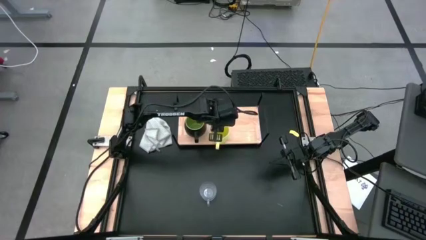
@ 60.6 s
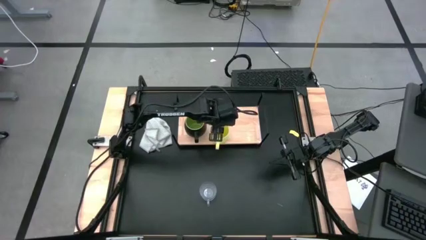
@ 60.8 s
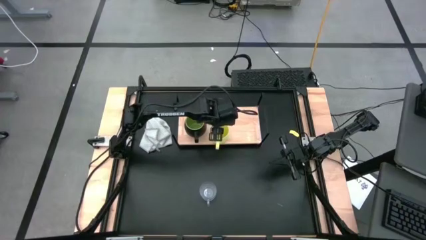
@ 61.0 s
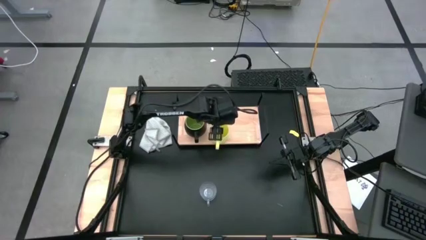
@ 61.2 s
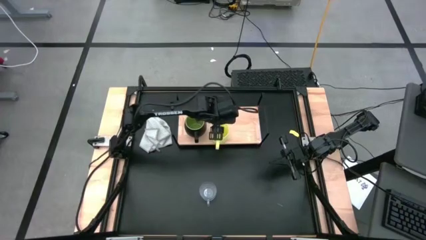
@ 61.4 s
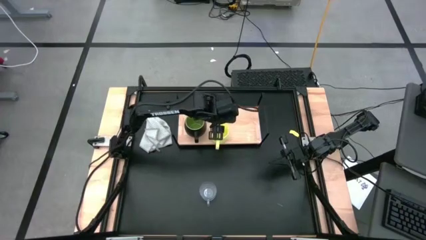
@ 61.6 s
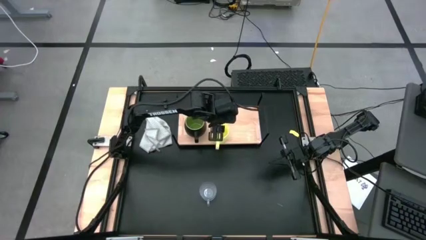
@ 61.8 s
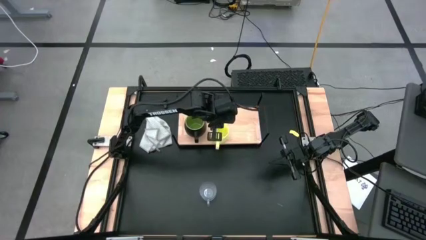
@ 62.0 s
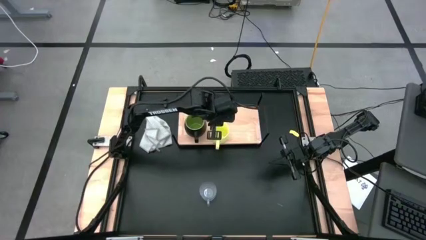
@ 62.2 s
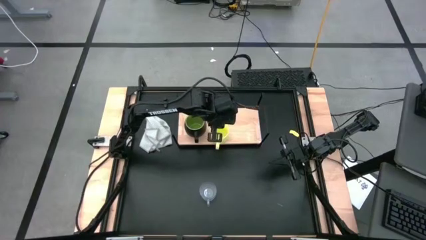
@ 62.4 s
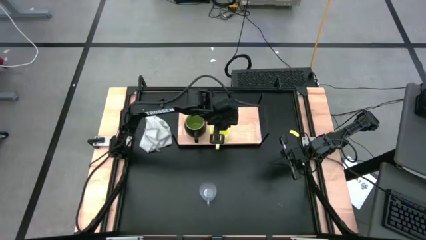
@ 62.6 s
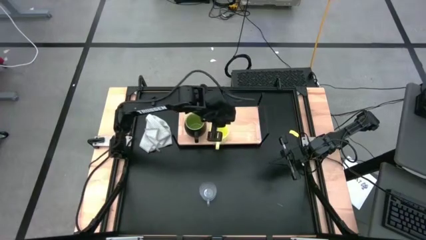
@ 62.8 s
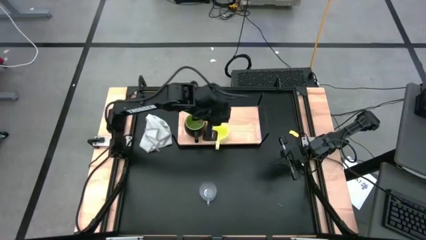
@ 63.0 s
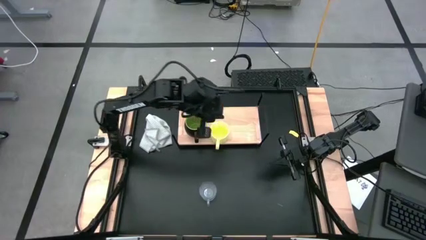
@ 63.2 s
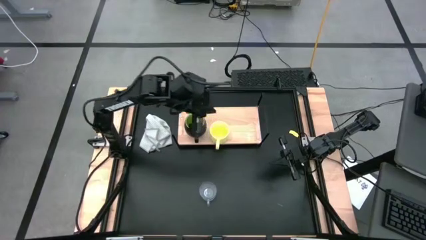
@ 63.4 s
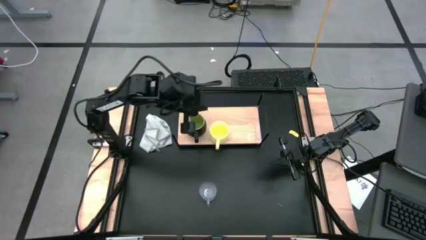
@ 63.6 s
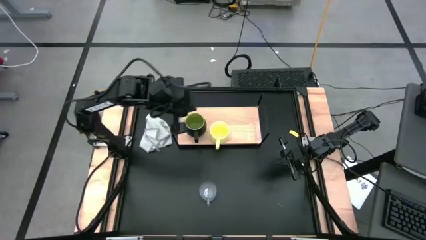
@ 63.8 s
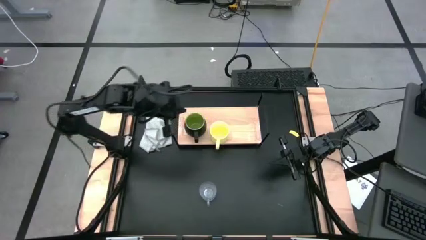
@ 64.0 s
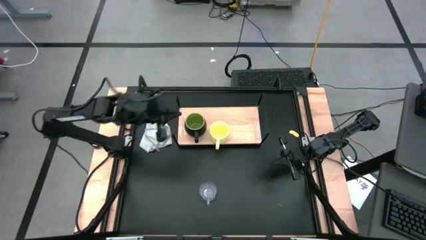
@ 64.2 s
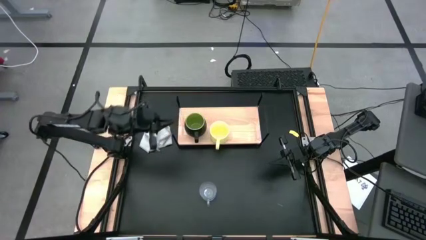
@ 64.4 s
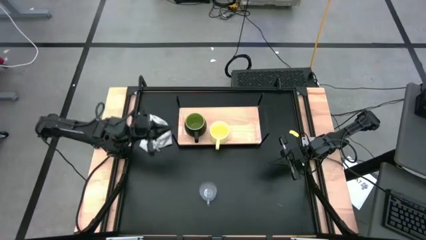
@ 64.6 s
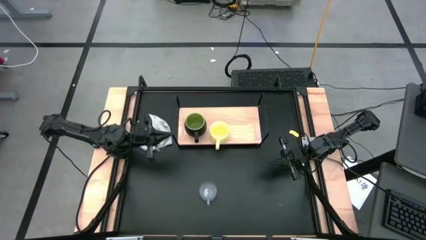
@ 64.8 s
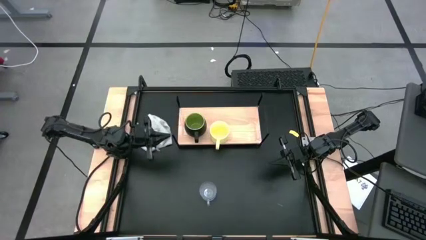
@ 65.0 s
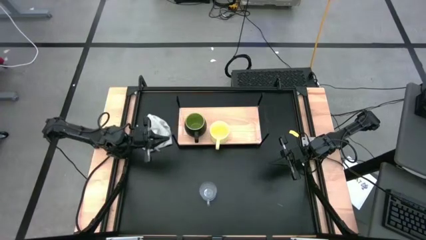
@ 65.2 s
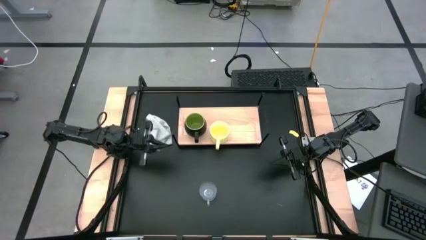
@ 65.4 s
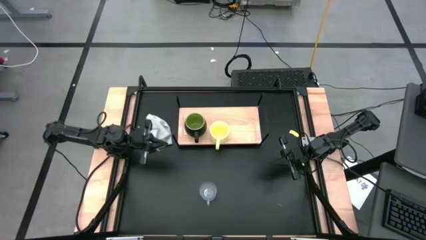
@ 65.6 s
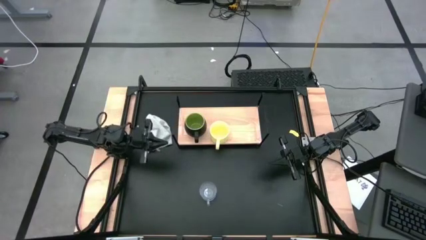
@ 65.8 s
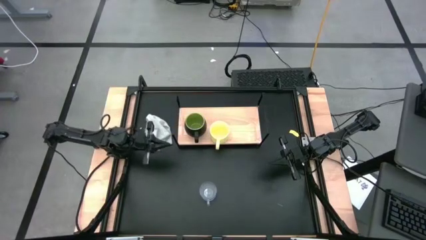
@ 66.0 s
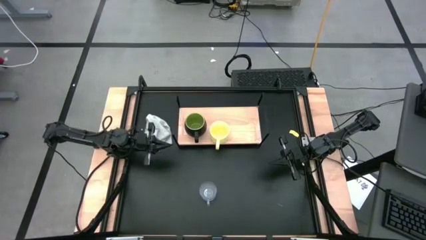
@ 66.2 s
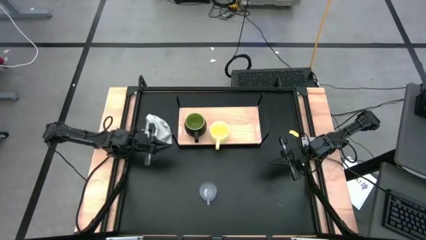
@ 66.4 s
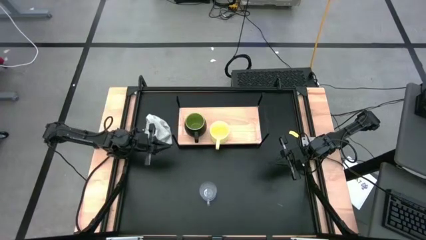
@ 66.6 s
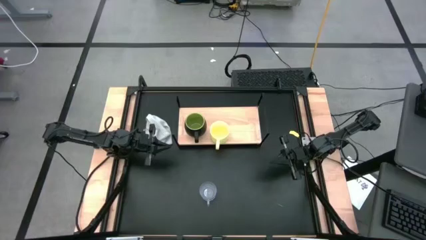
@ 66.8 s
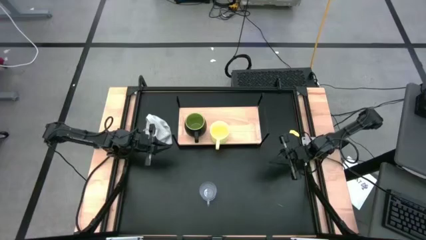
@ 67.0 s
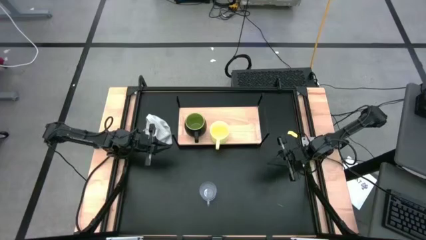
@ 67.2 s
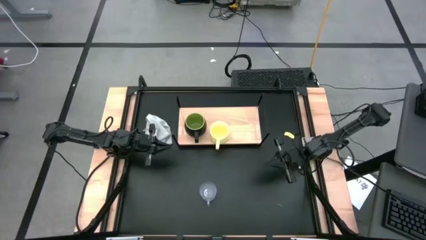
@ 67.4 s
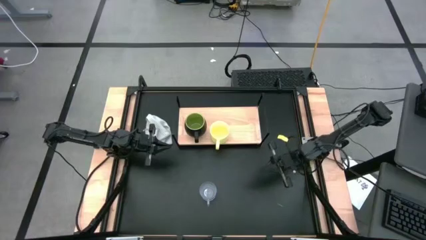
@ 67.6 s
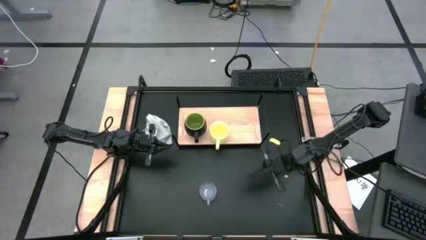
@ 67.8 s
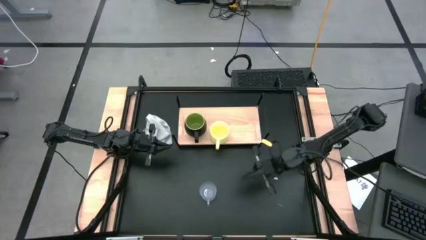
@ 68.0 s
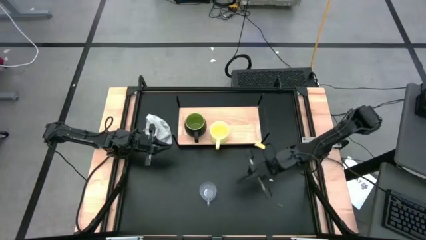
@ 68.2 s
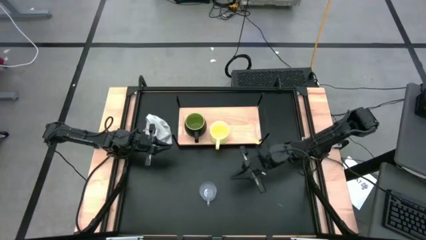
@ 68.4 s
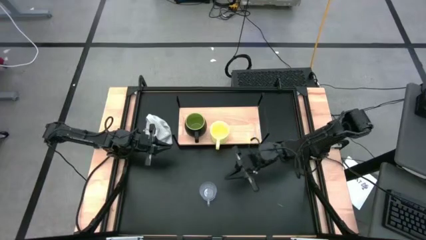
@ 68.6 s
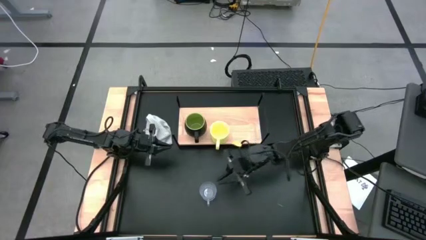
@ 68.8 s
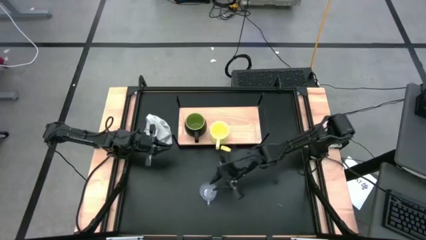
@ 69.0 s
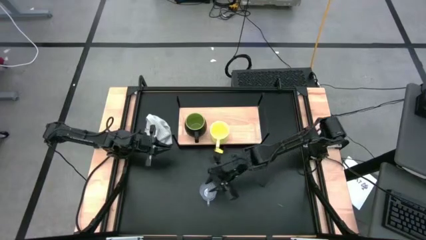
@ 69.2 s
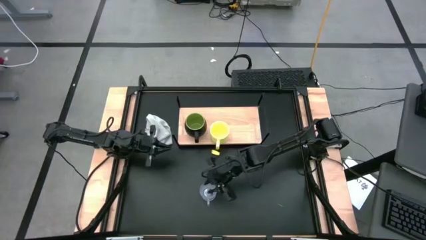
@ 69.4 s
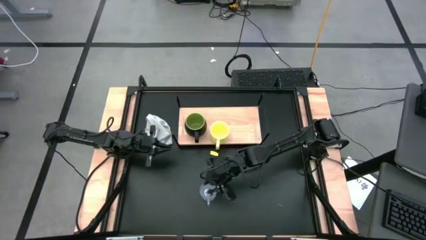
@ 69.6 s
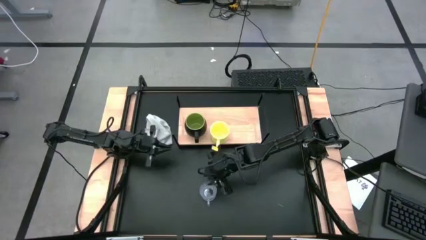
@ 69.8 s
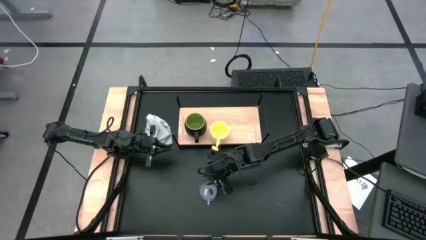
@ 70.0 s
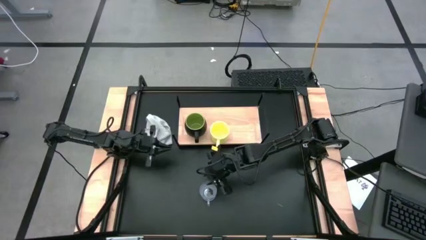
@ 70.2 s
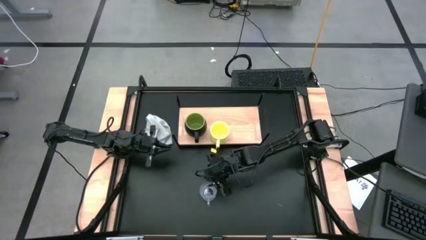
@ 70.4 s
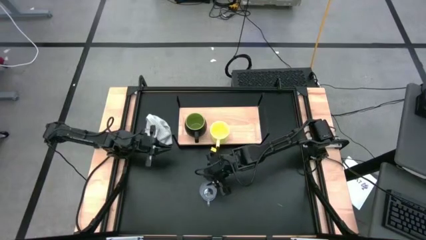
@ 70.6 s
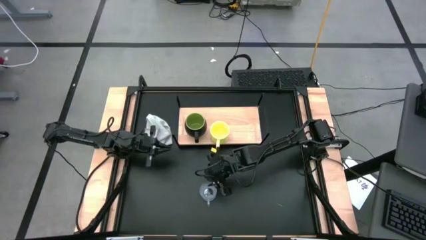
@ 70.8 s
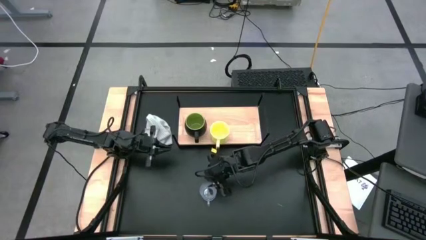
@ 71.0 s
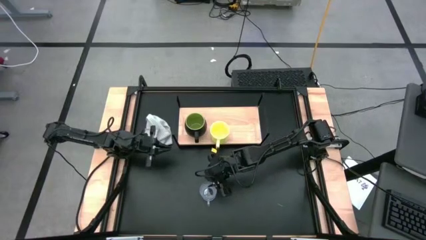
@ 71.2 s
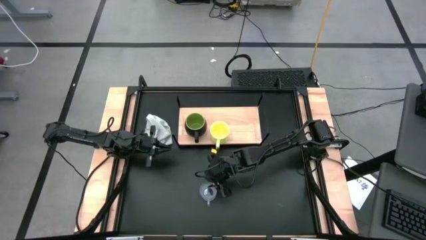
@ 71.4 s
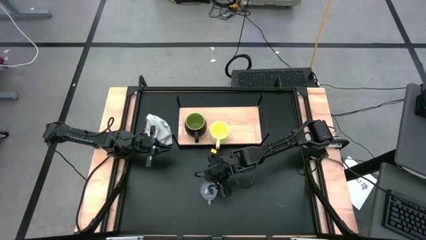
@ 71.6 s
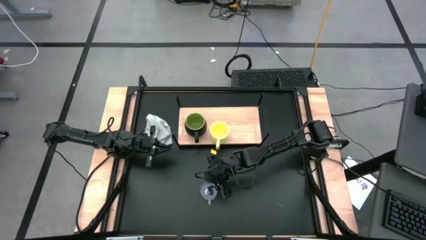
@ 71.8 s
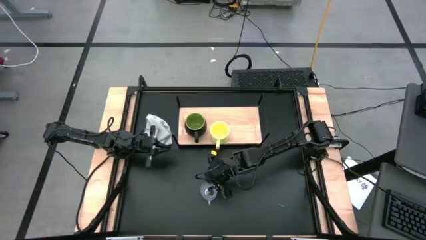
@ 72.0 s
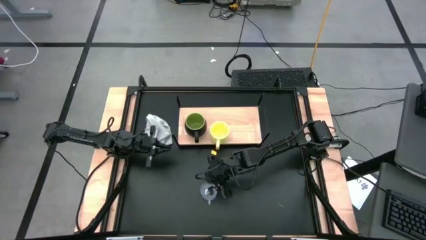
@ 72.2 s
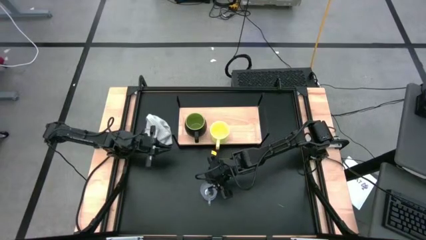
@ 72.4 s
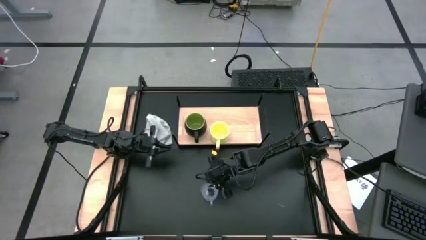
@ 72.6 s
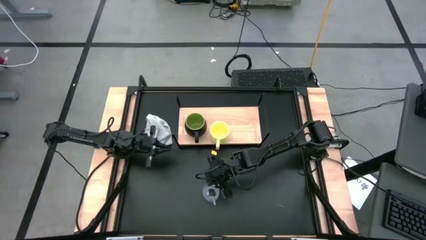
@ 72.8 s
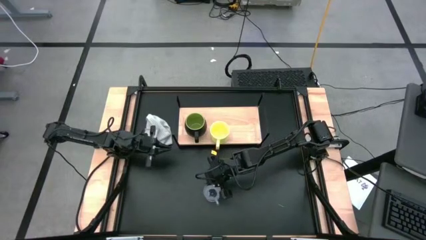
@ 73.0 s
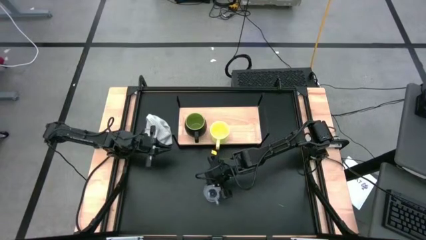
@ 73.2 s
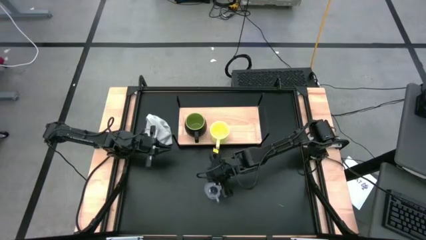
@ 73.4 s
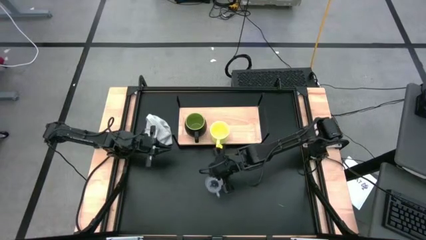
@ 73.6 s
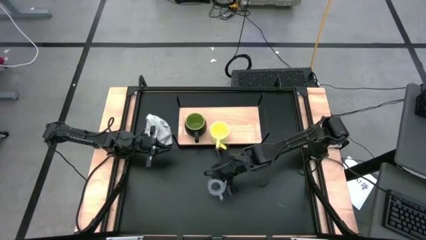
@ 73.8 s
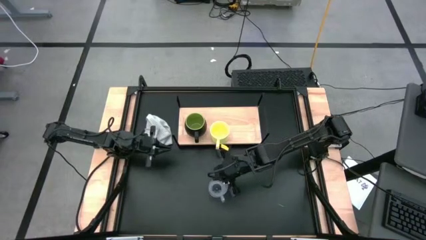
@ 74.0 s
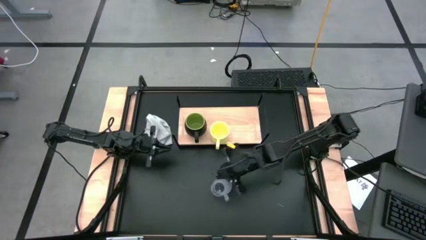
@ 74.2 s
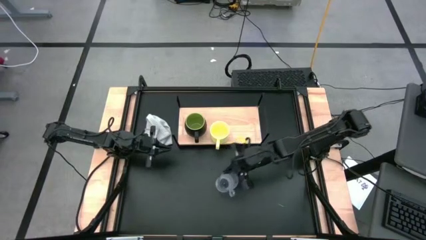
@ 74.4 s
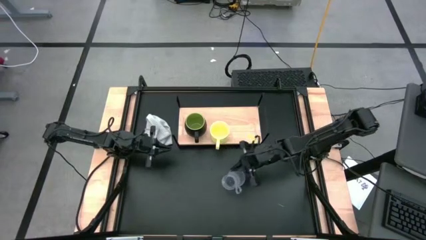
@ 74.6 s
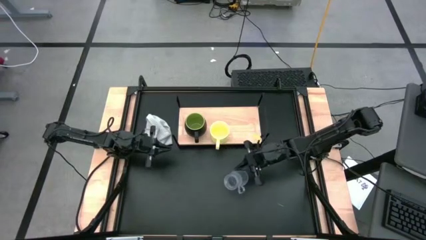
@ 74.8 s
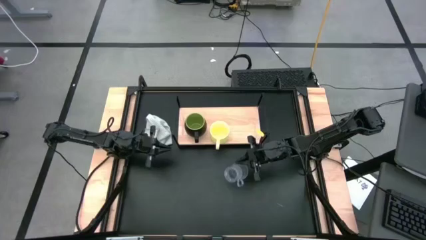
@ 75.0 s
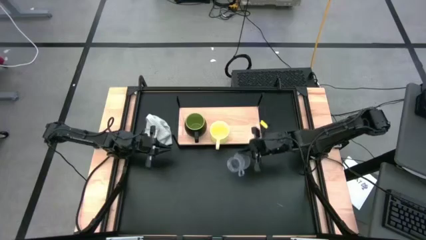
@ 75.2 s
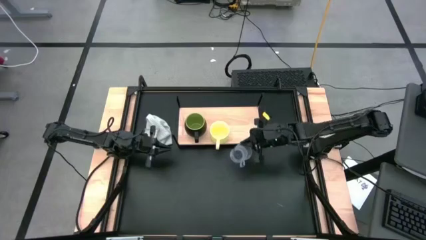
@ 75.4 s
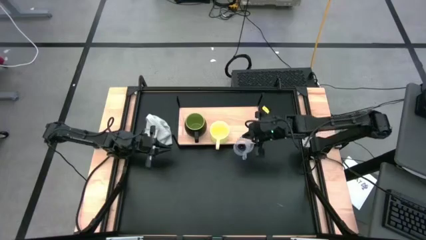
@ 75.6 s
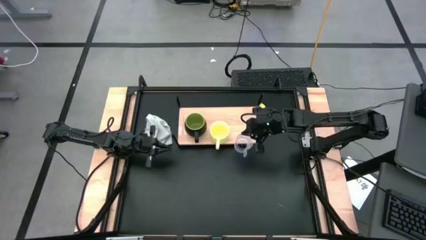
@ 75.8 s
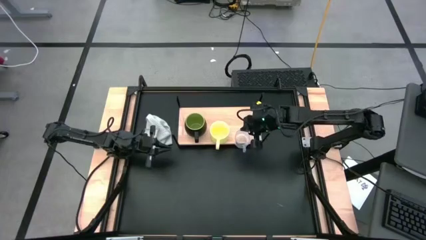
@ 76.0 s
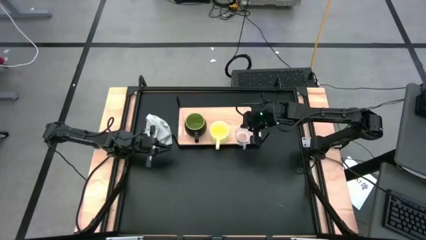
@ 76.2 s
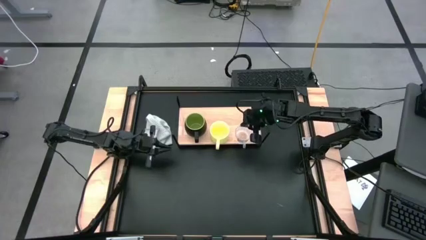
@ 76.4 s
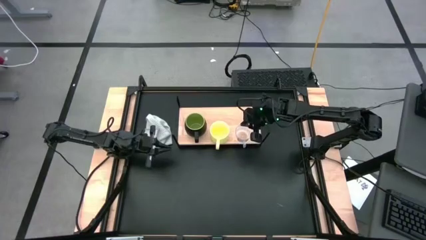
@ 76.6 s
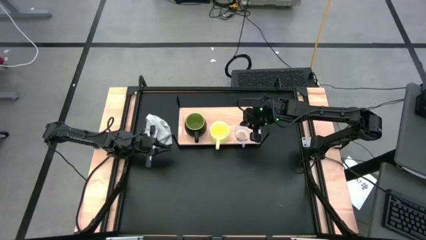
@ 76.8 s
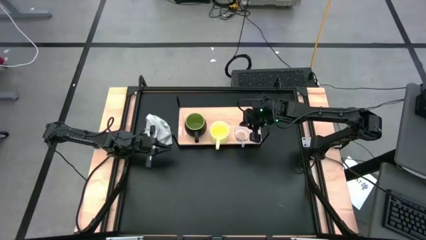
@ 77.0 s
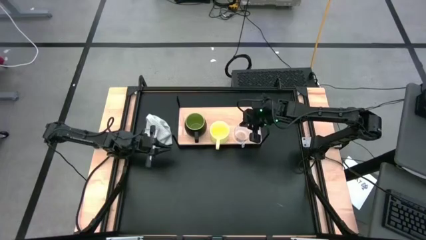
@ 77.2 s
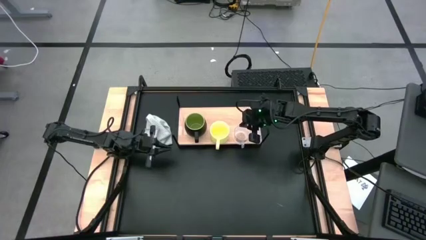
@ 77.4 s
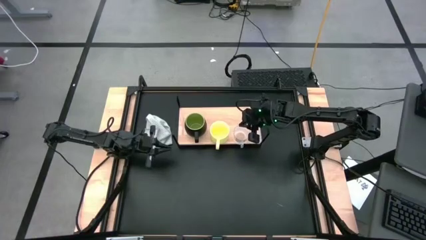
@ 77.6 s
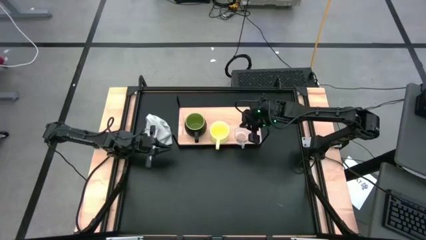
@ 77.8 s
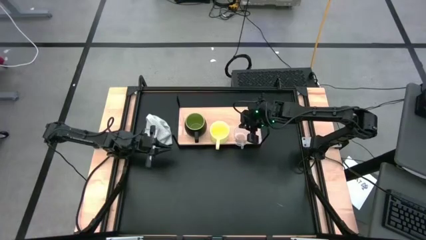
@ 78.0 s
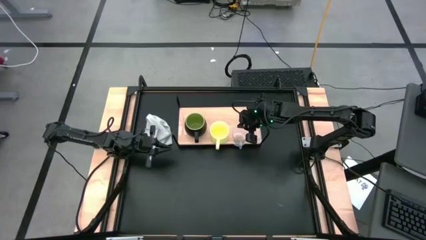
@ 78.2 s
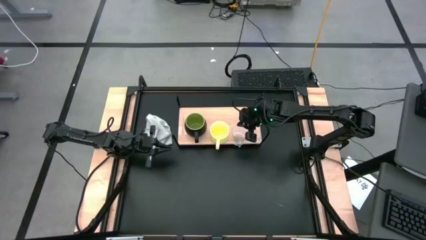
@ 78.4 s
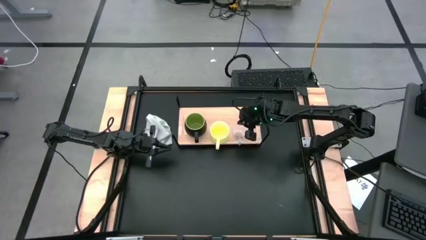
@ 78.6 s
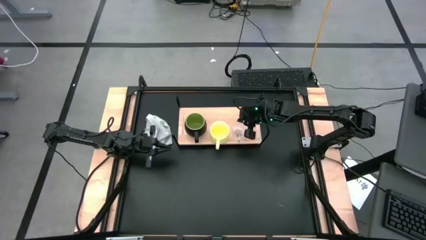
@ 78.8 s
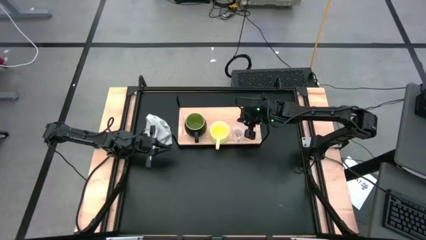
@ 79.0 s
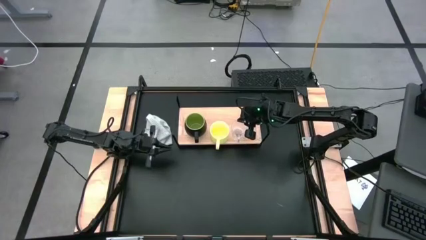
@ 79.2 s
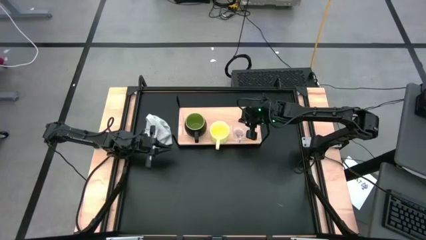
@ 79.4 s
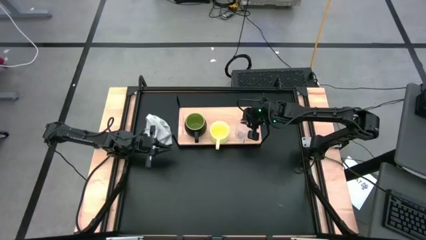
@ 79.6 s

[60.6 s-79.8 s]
Task: Stack small to large cups/mugs on shelf
Put the transparent mug on the shelf
